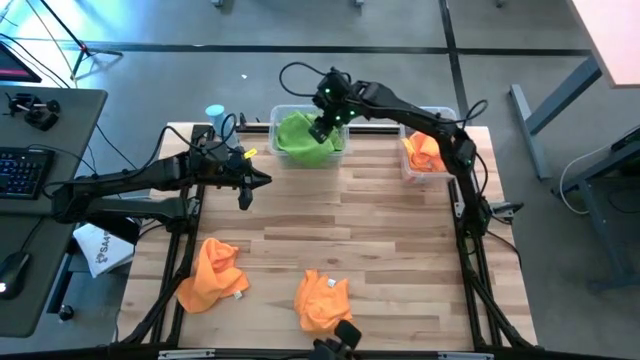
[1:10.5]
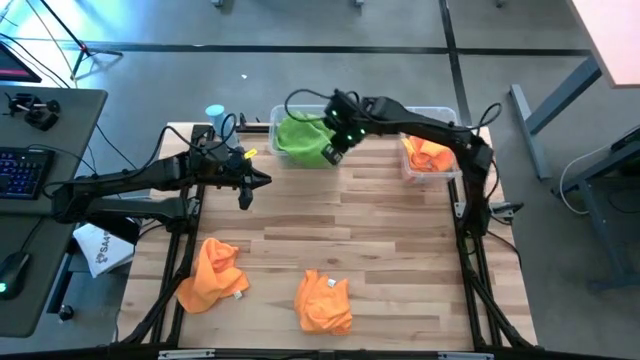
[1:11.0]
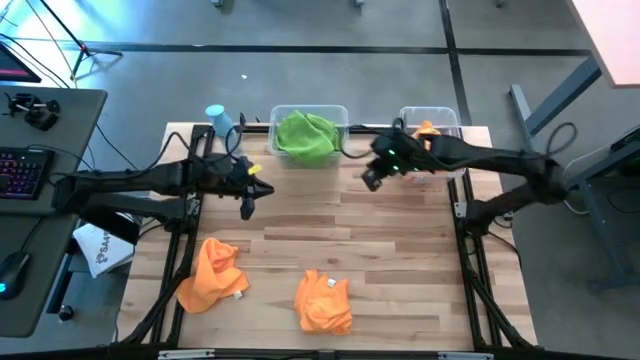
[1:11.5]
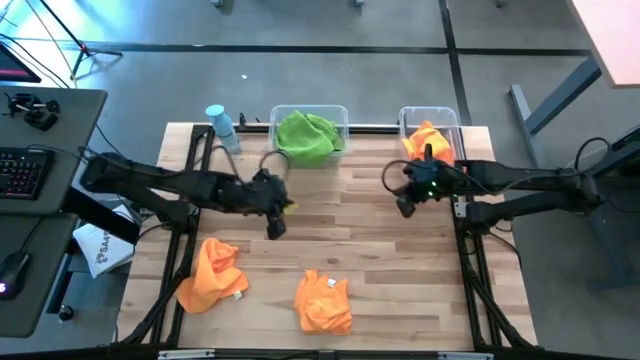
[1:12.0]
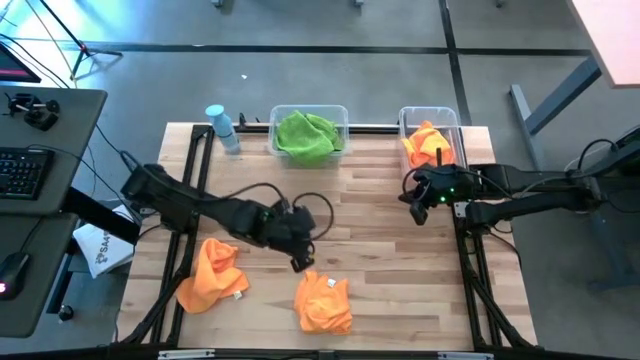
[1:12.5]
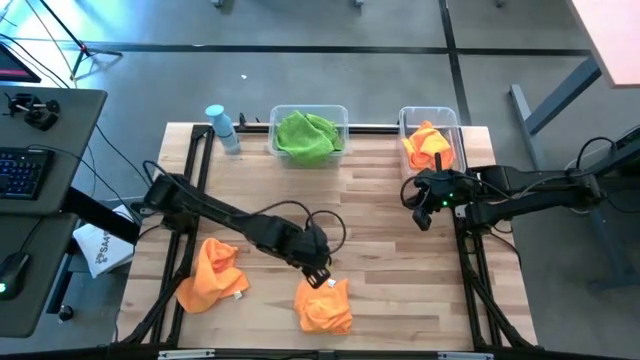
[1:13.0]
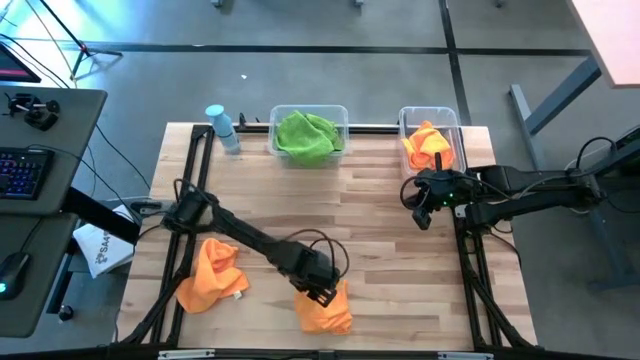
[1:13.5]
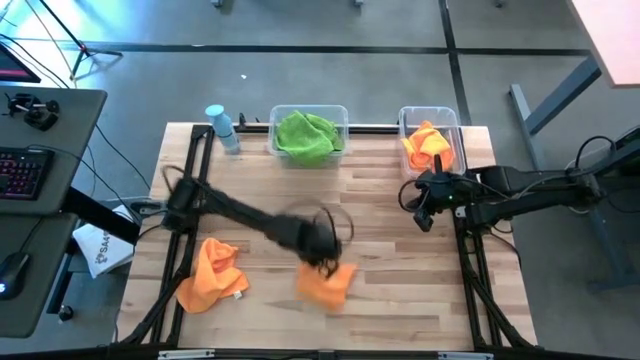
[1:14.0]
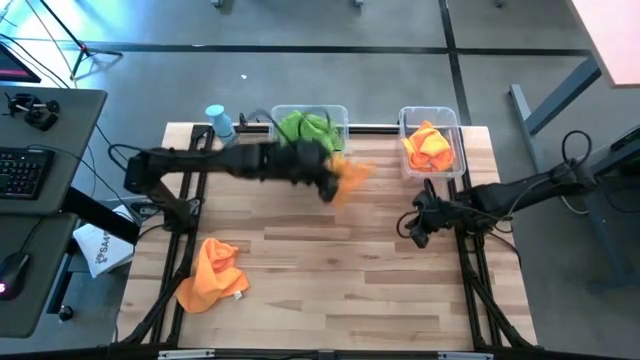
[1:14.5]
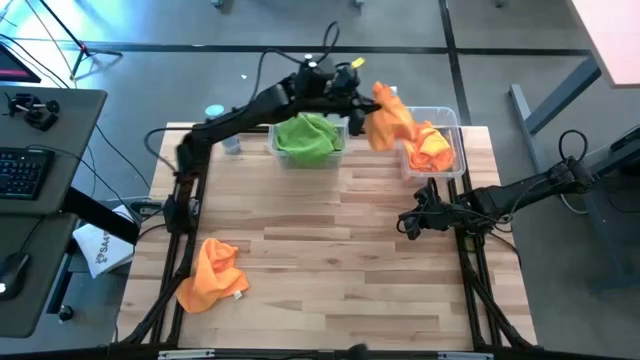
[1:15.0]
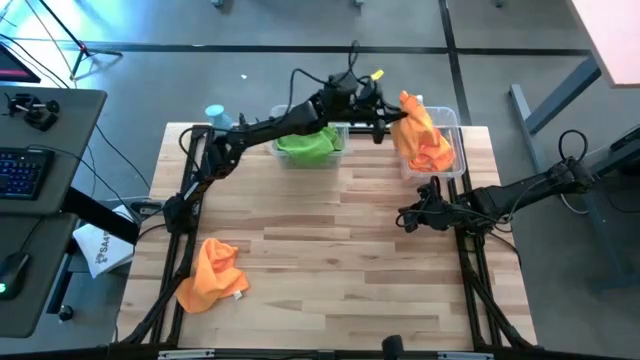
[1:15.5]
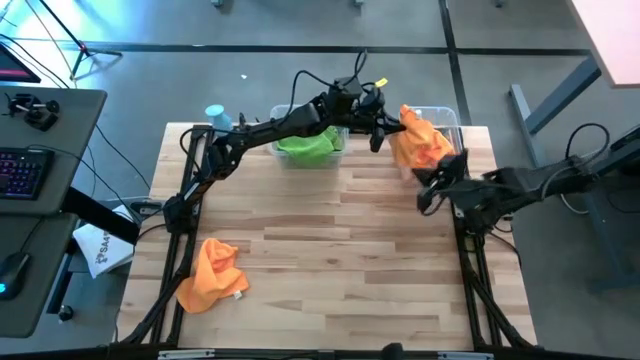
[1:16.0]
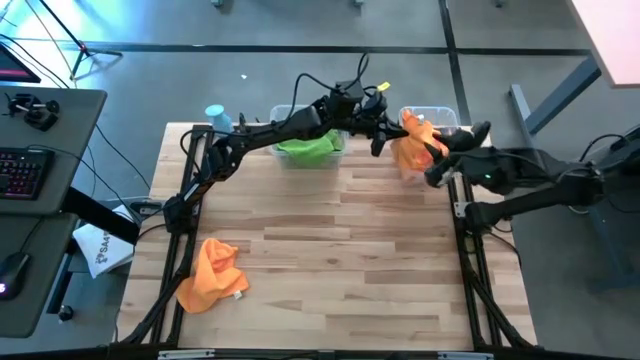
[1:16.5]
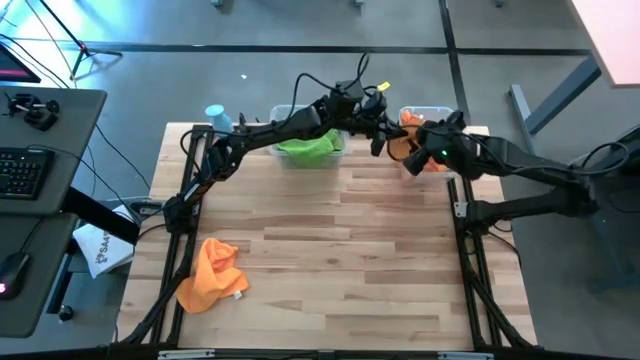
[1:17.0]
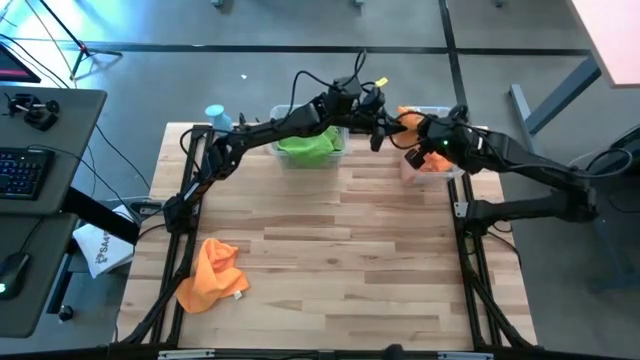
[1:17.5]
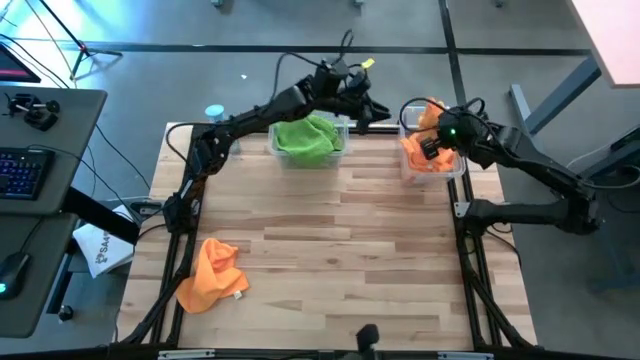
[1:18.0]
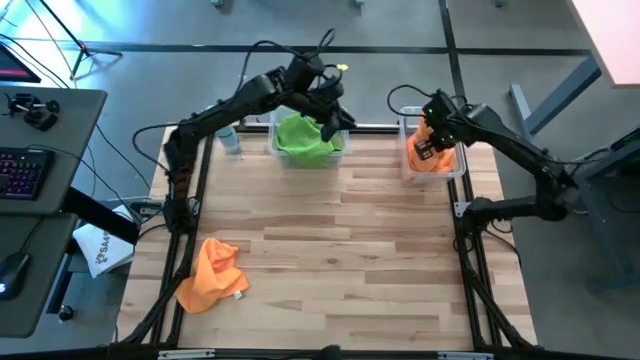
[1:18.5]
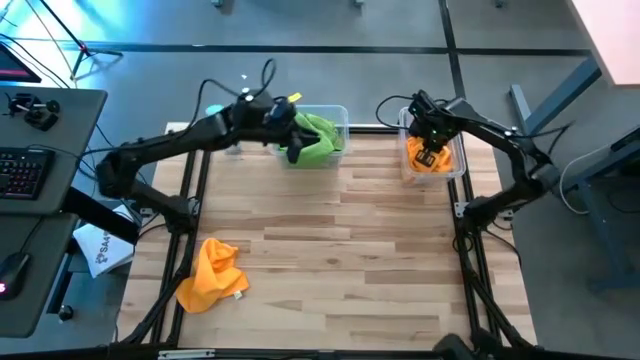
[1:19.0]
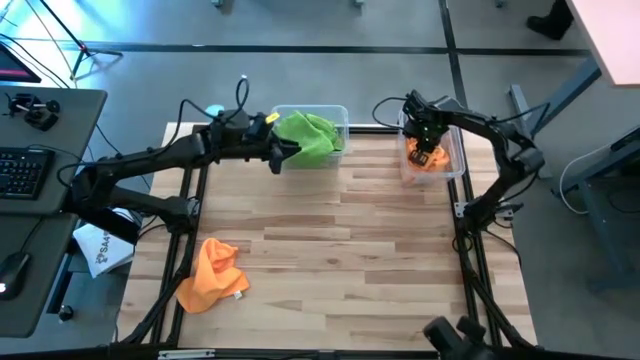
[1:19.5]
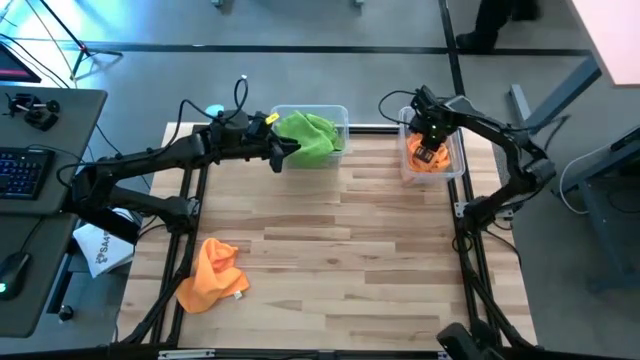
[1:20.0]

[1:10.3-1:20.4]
Task: Sort microfiber towel by color & place in baskets
Put the orange towel into the right transparent bin

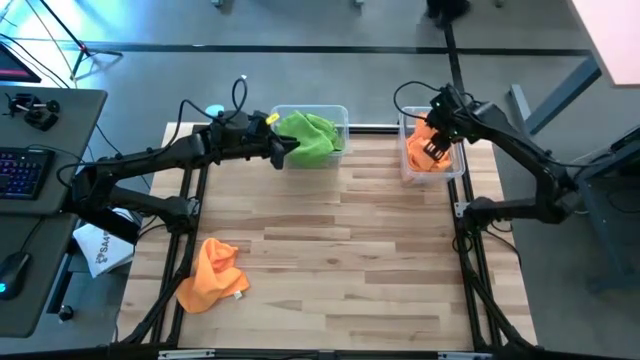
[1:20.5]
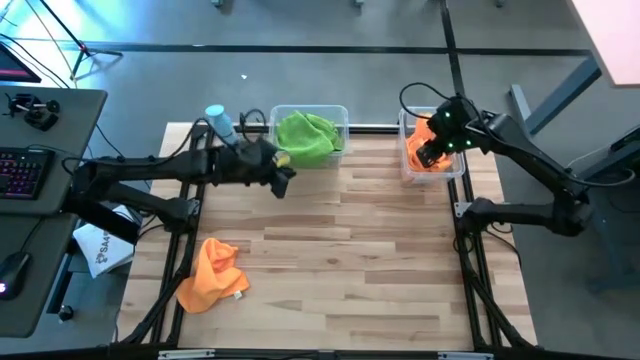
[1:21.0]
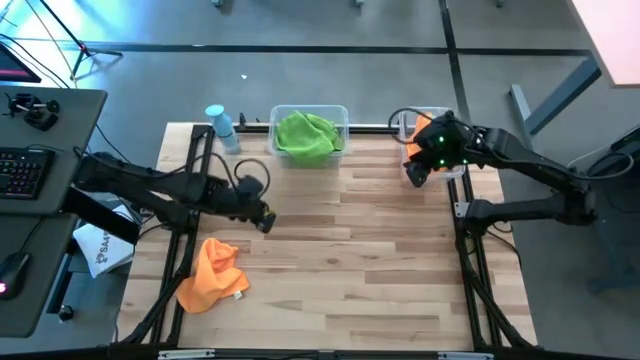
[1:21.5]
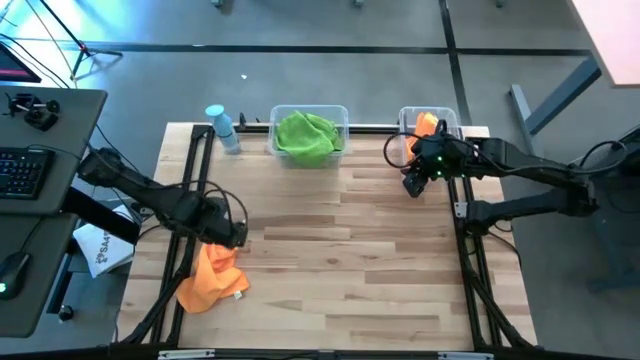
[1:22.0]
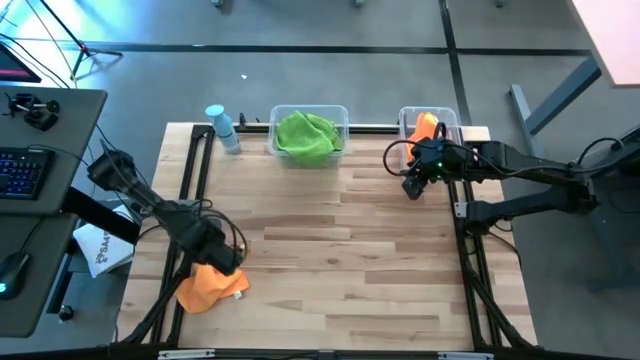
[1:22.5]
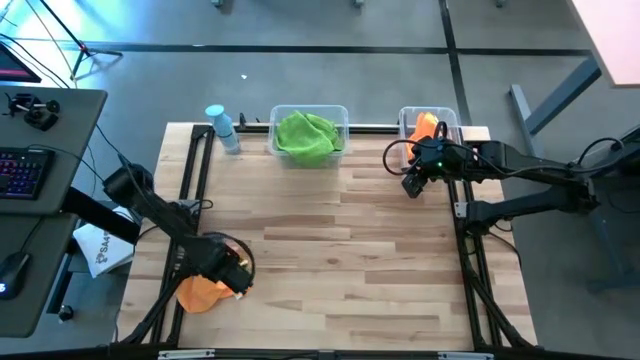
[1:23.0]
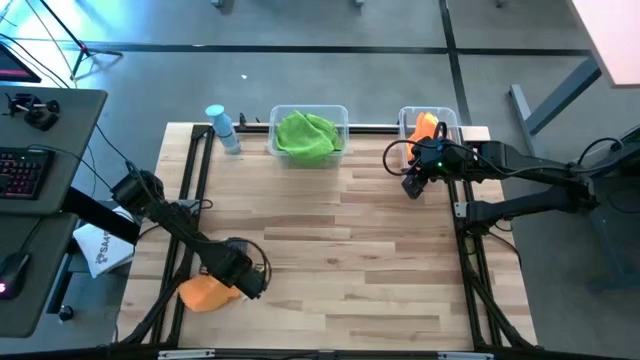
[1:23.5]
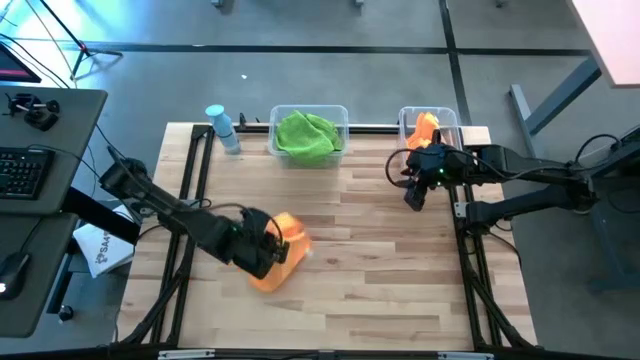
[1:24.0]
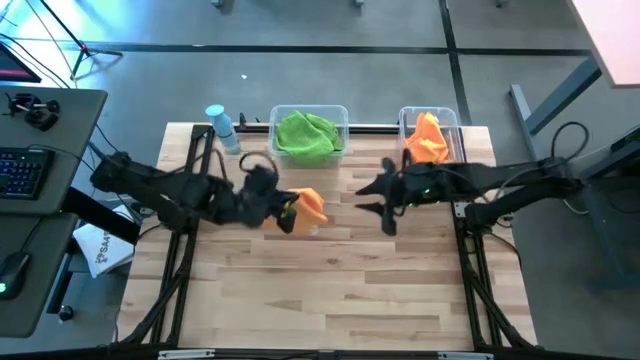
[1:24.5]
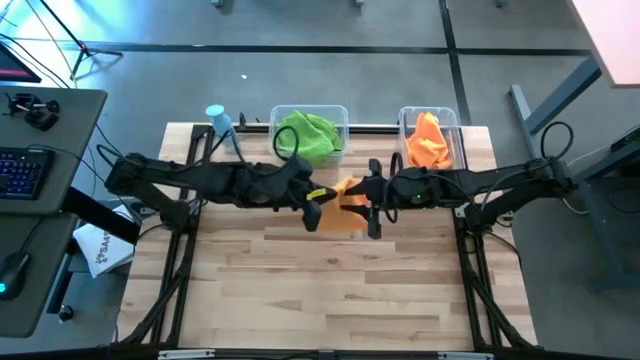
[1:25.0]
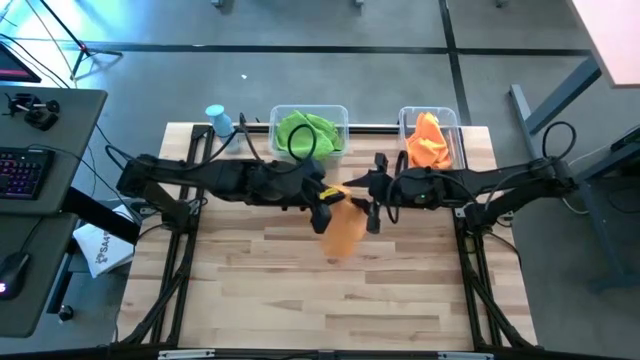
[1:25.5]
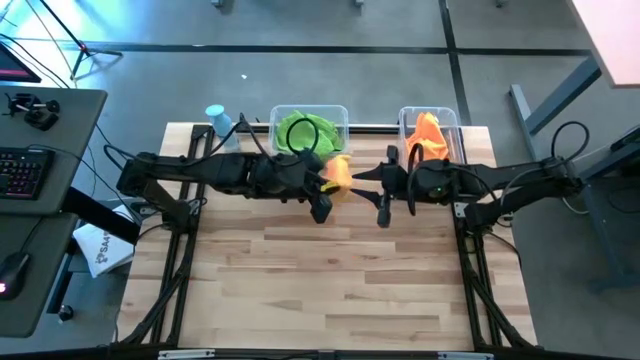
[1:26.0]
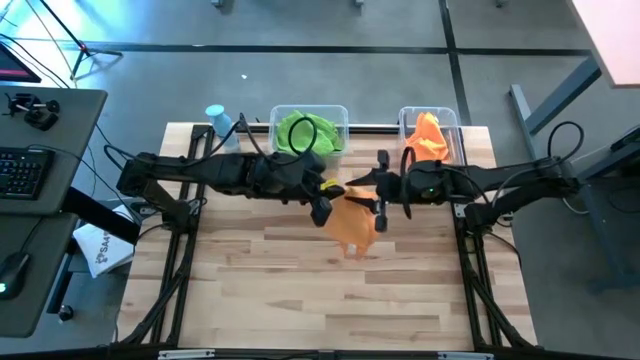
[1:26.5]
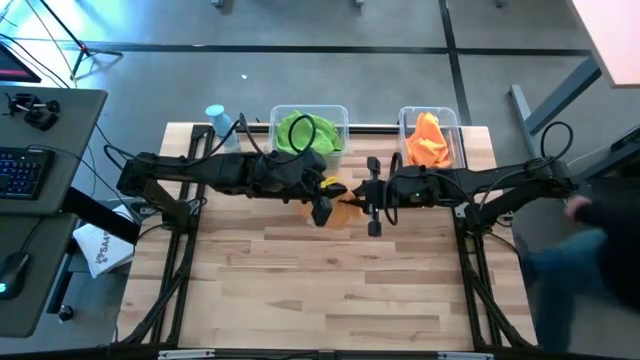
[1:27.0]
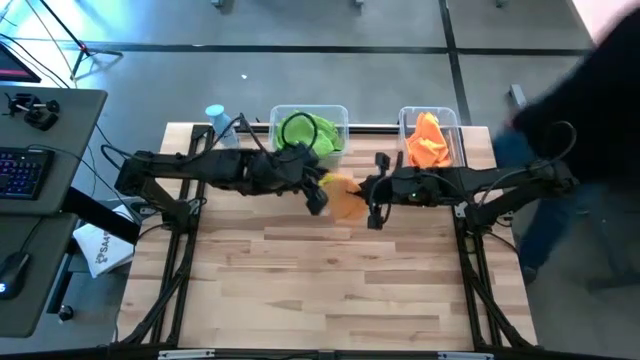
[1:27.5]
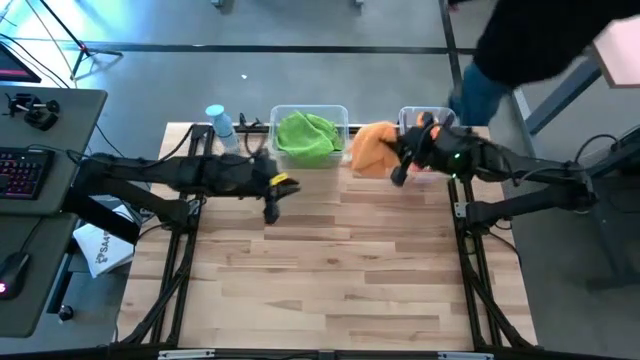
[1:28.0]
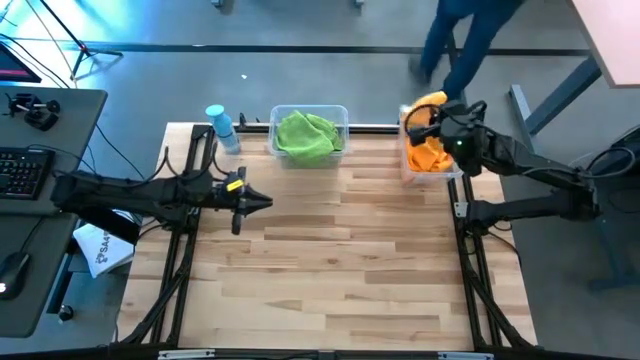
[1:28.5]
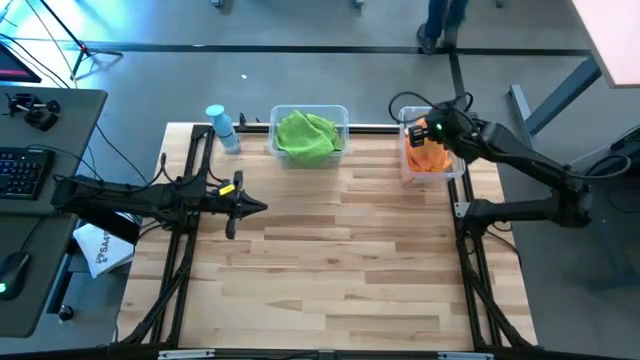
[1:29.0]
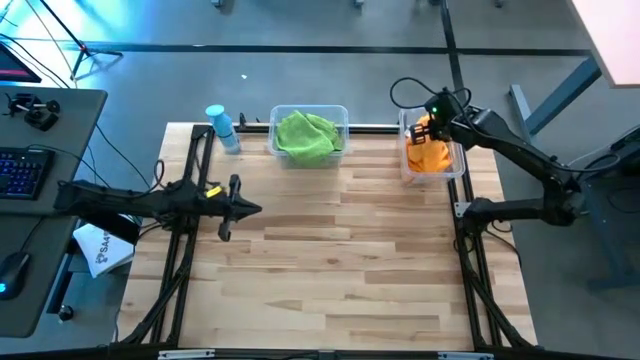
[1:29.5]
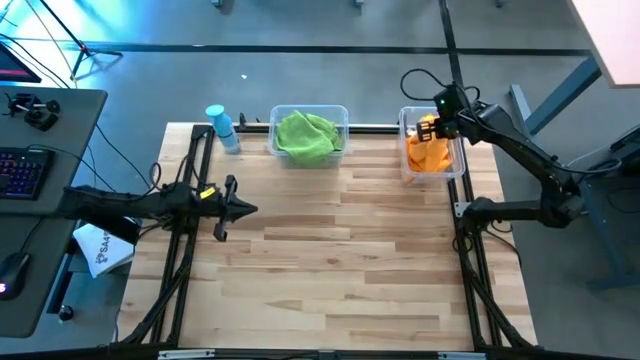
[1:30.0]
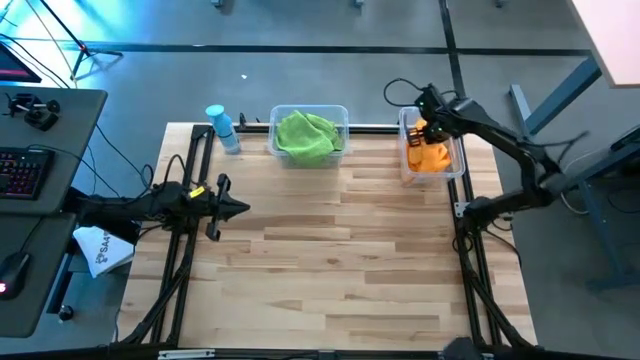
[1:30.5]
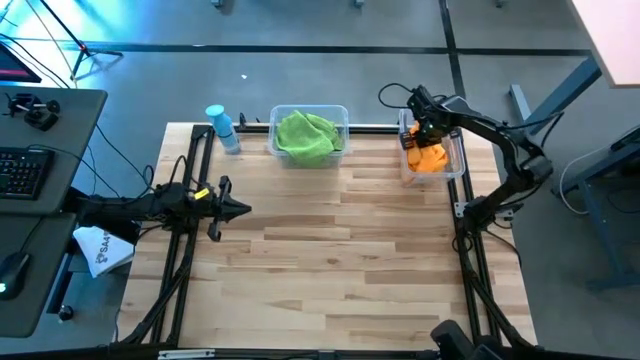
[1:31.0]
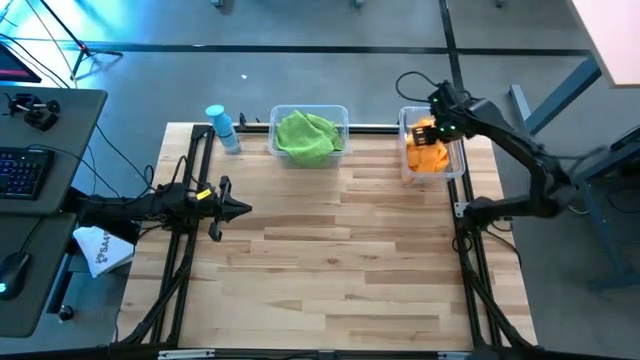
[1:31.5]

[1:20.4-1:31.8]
Put the orange towel into the right transparent bin

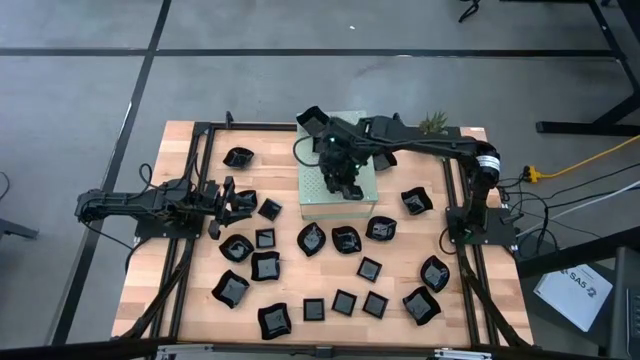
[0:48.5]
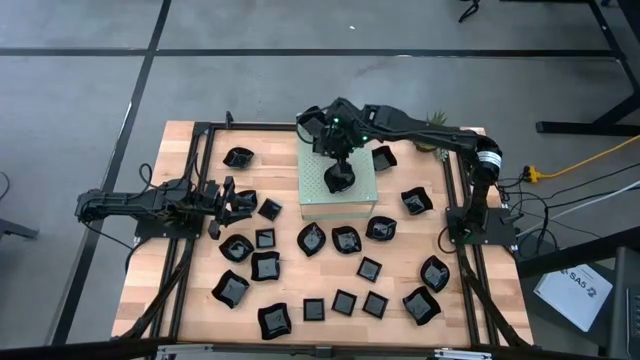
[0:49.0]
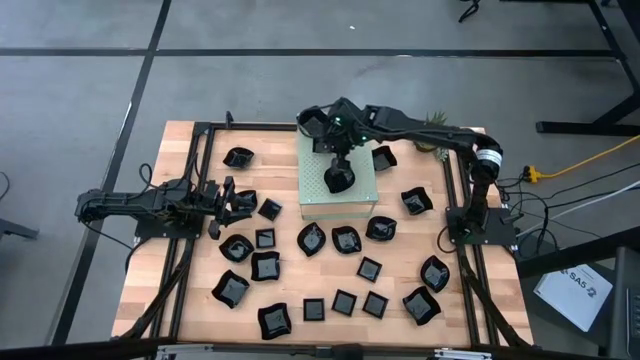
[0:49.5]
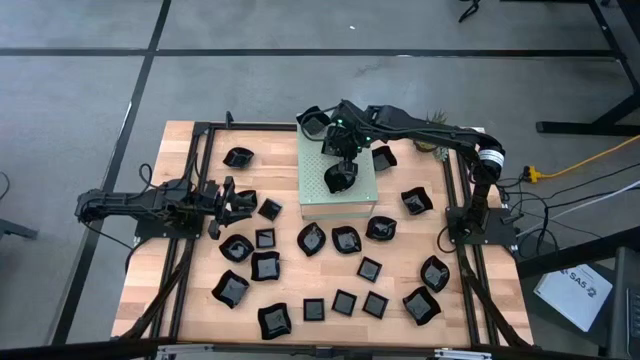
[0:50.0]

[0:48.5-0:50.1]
Task: Pick & Place Mini shaped plates
Adjust the black square plate on the shelf
